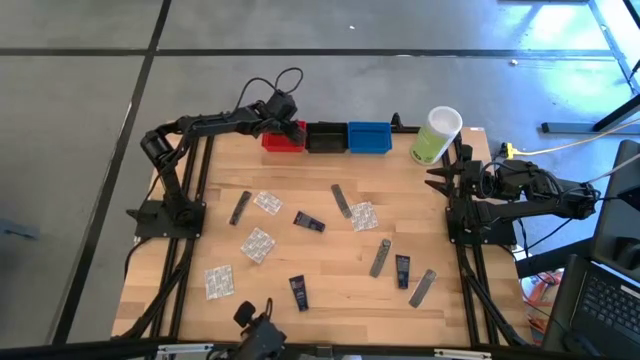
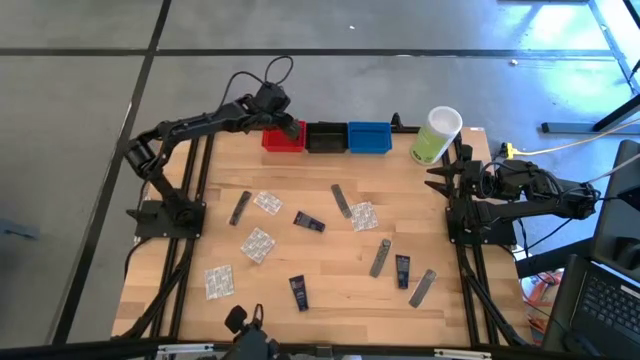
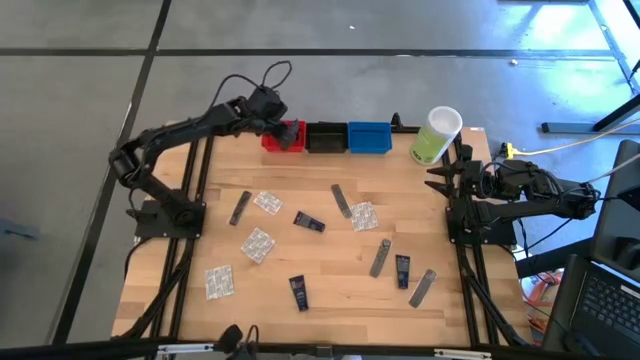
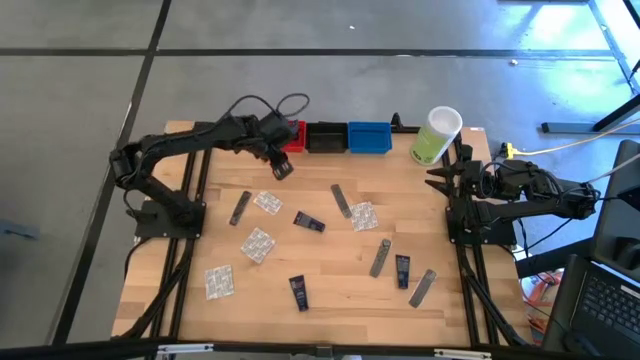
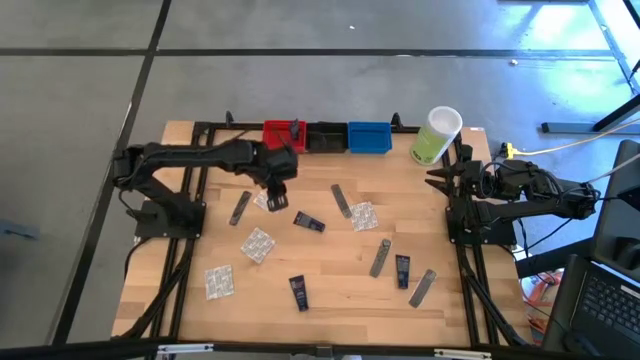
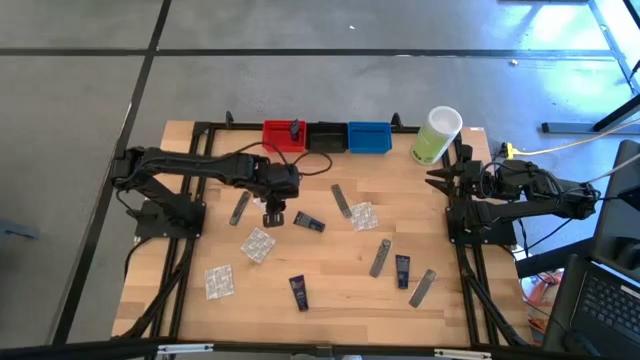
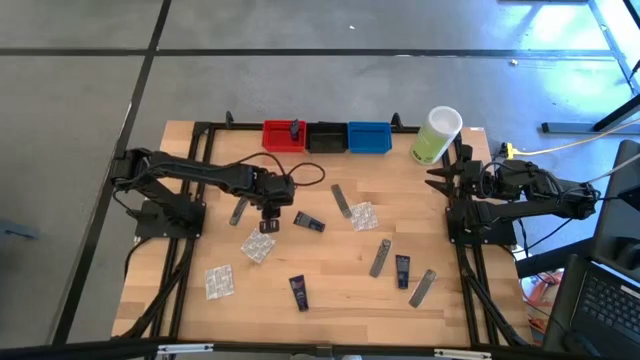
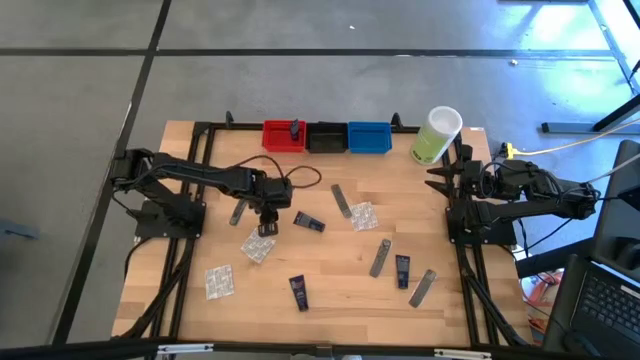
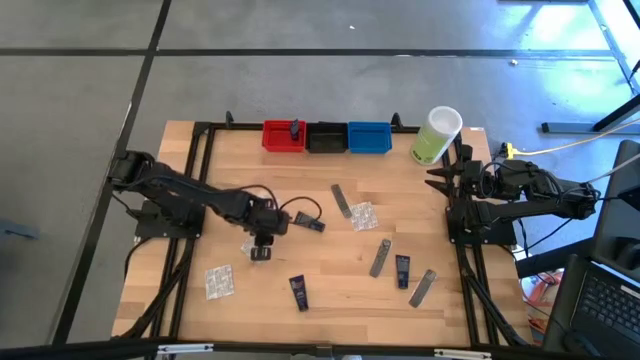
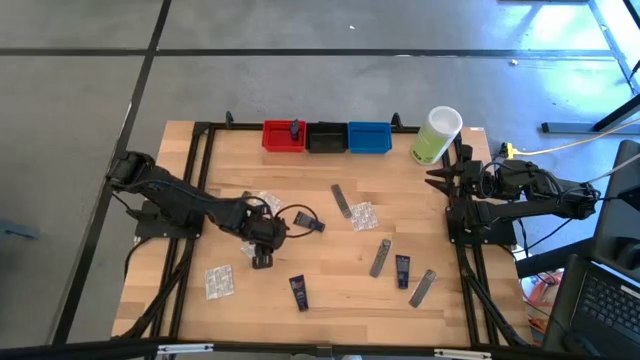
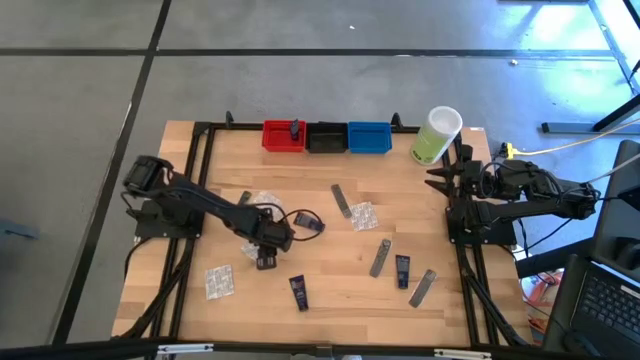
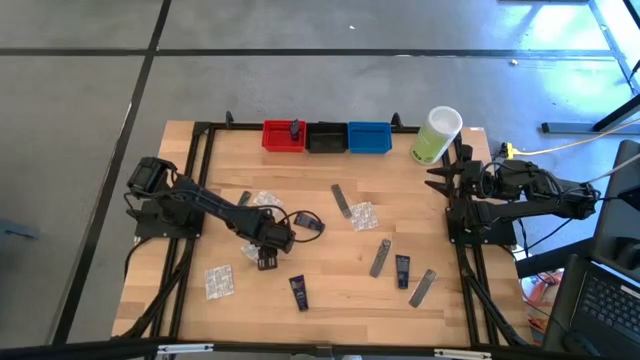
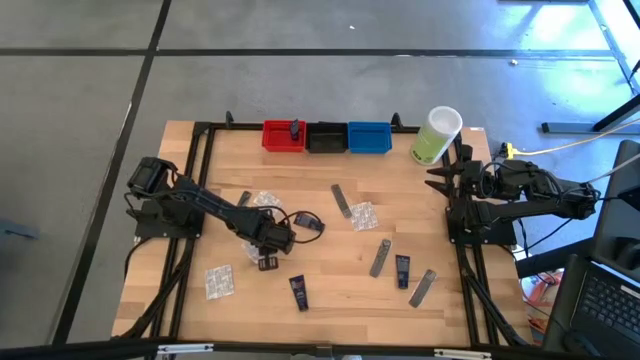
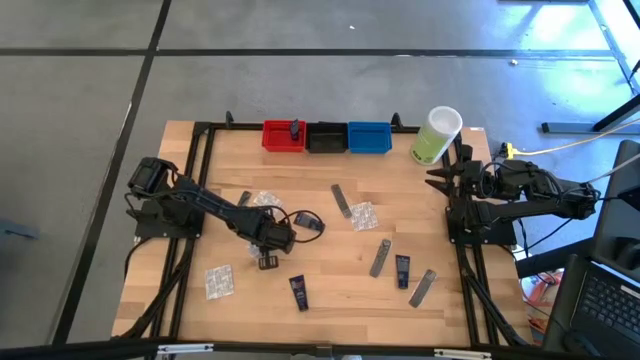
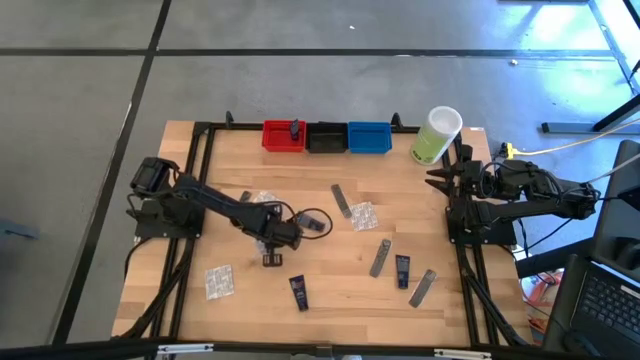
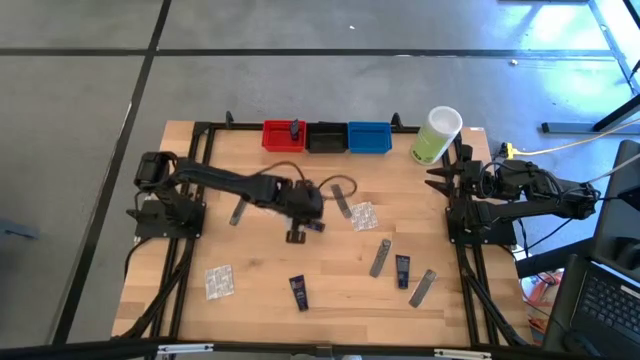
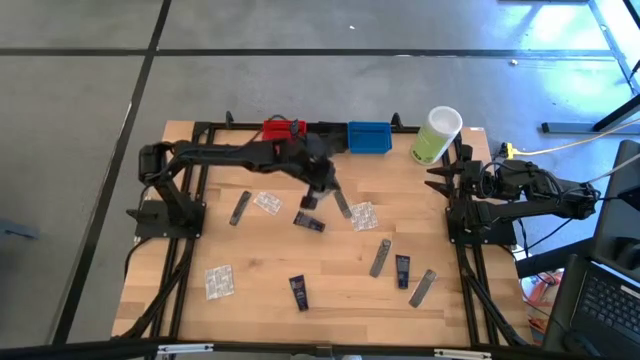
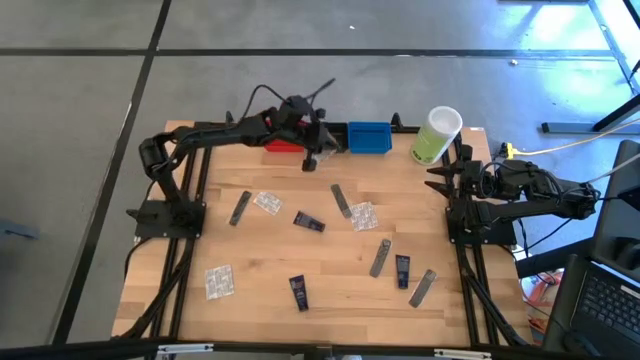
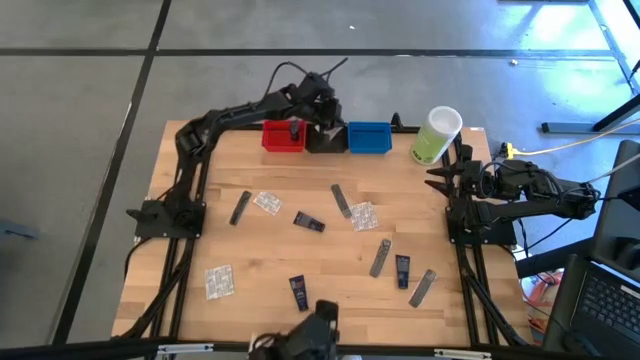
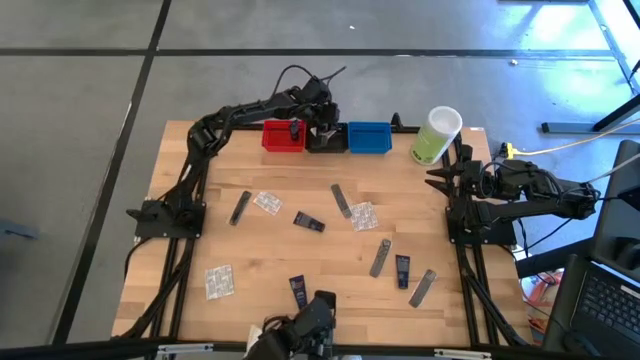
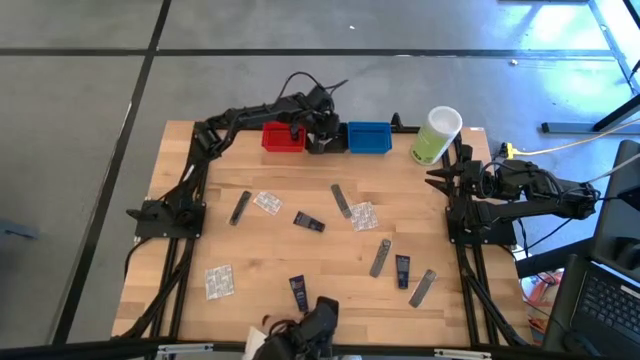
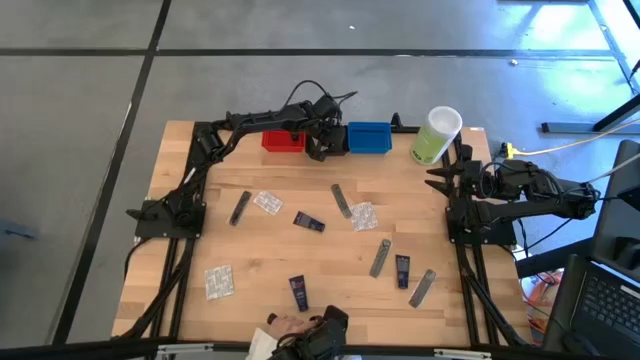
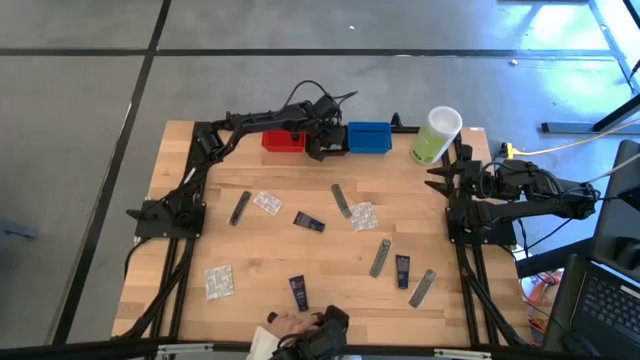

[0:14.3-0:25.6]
Task: Pick & Place Travel size toiletries
Put the white bandage pack into the black bin

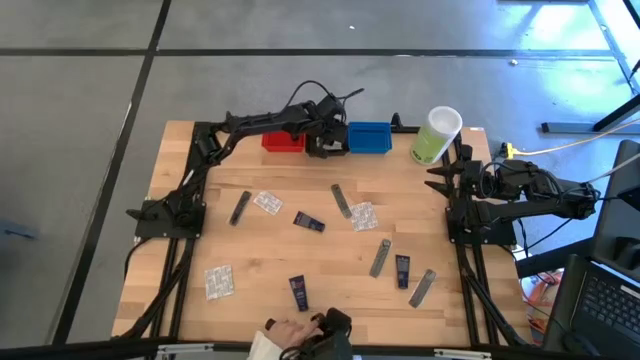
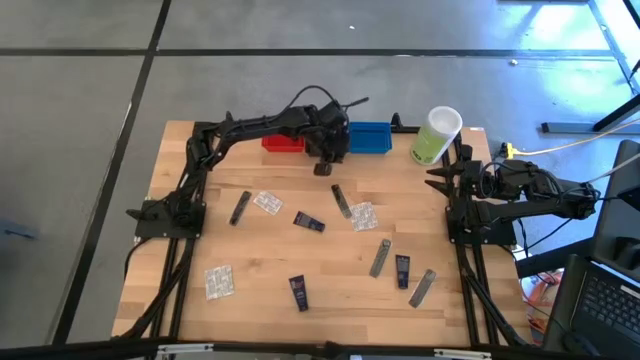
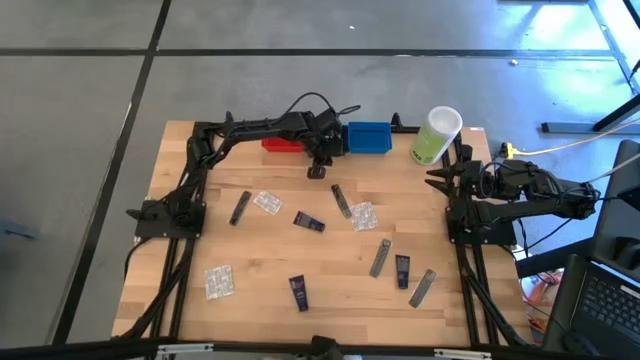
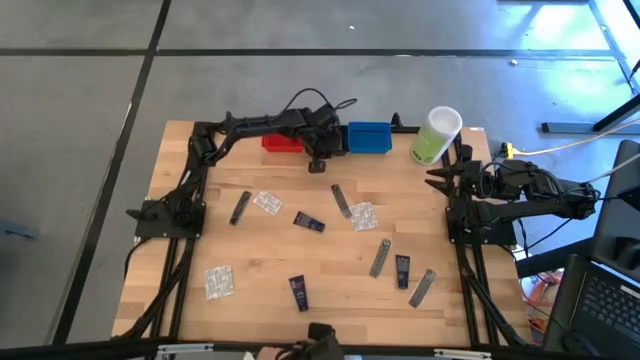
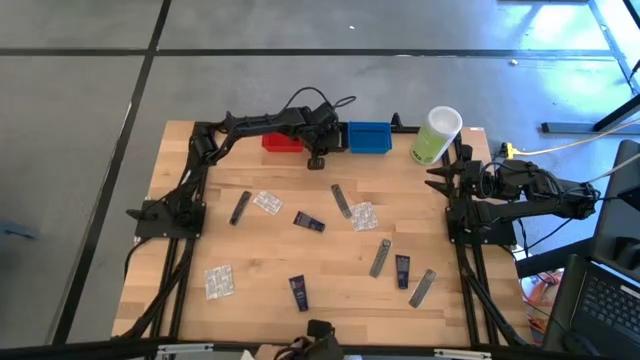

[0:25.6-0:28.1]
Adjust the black bin

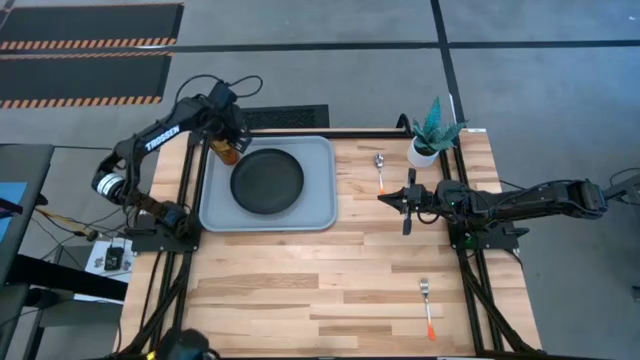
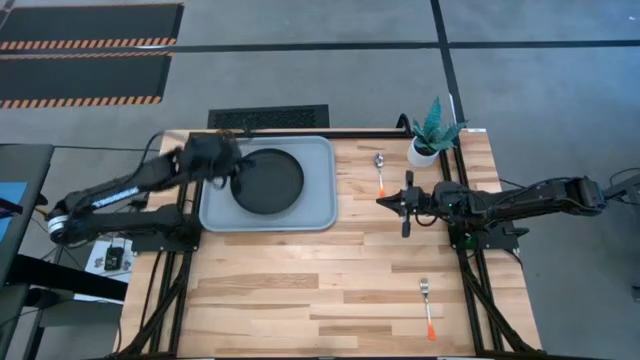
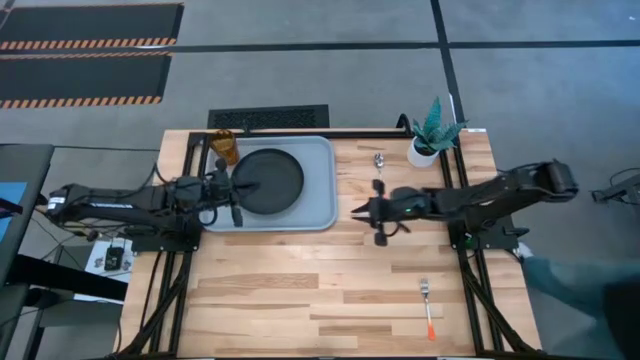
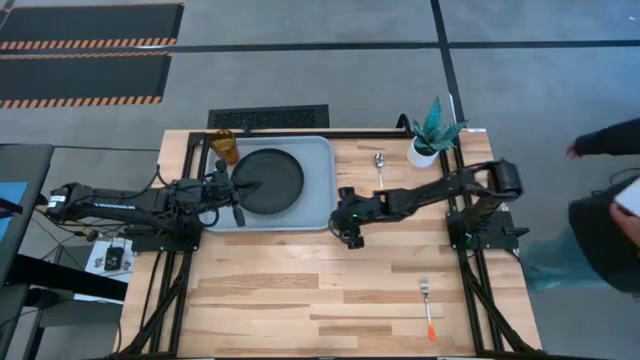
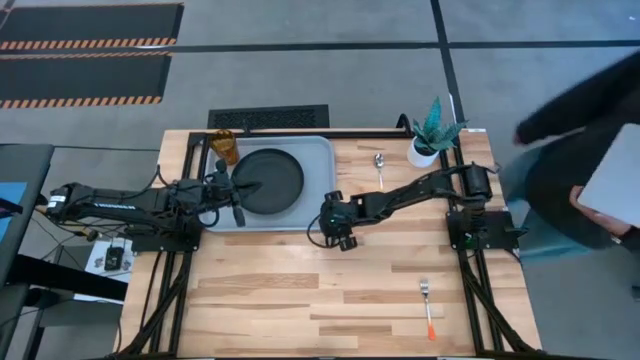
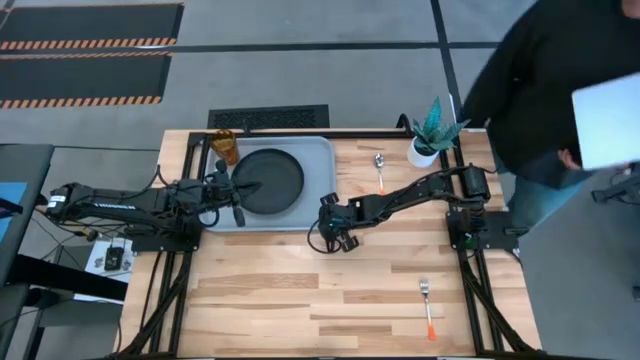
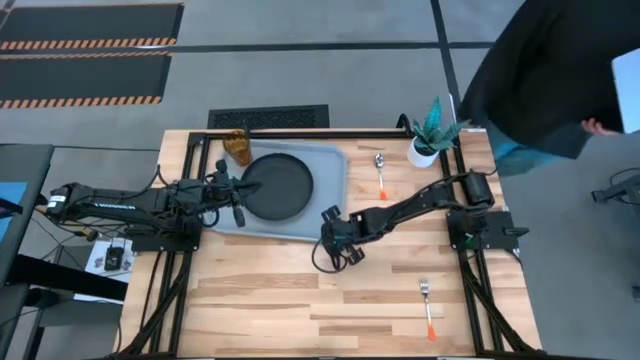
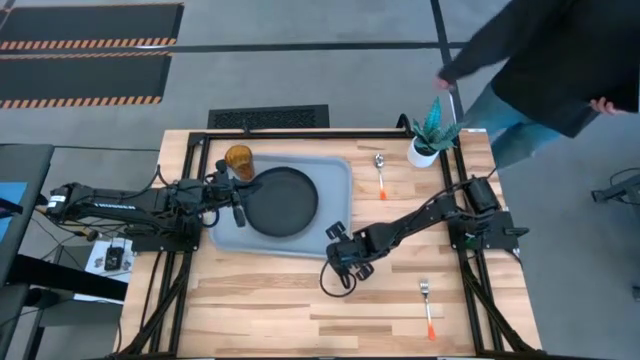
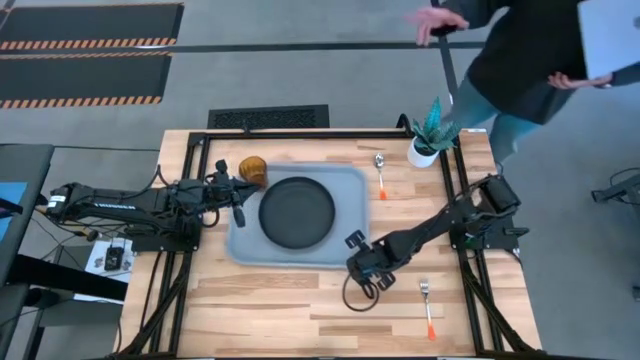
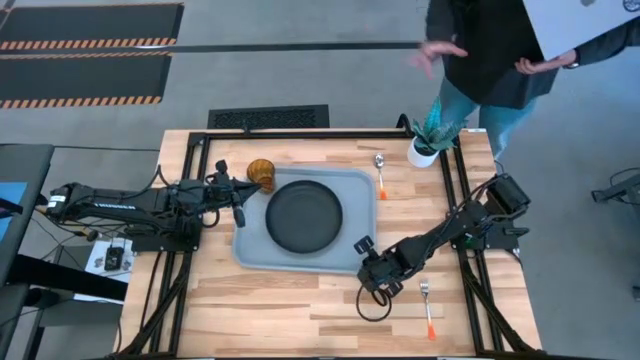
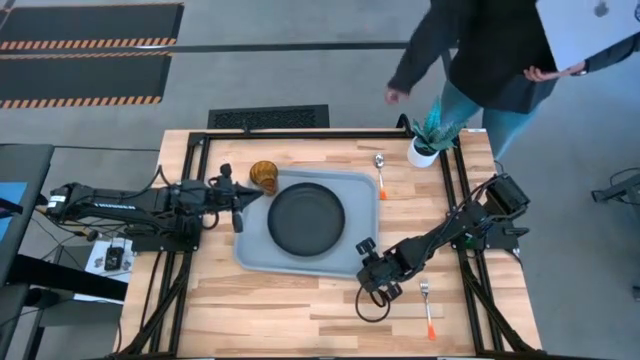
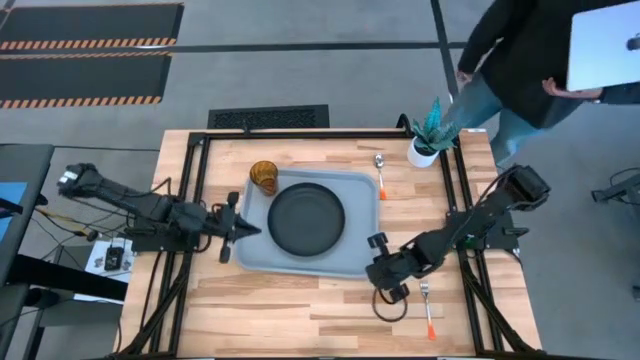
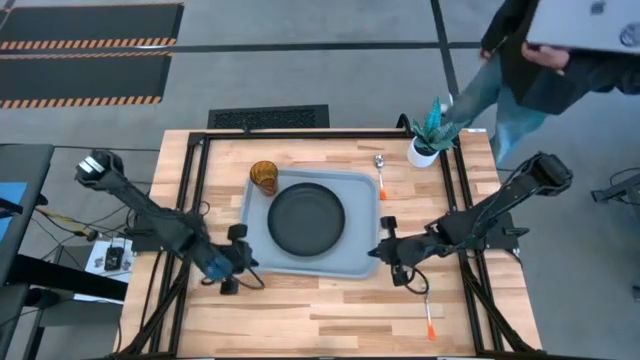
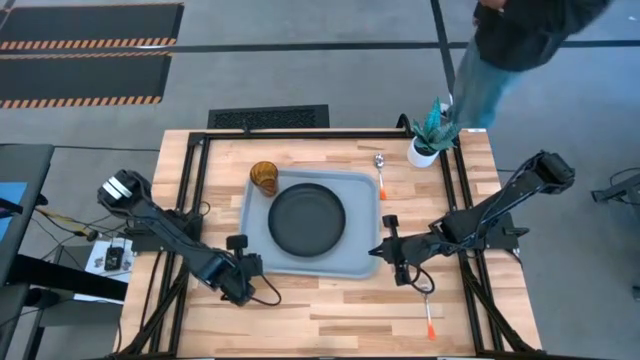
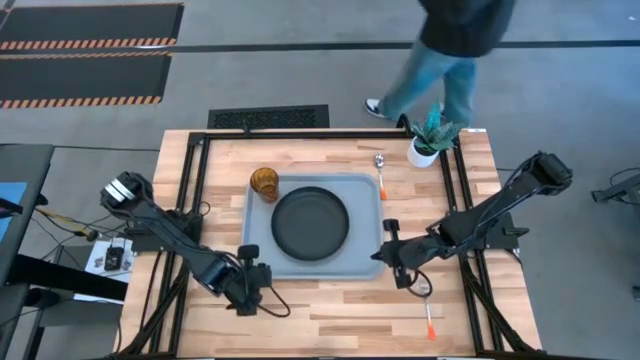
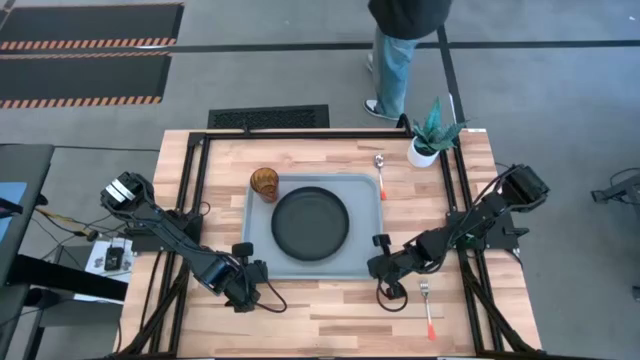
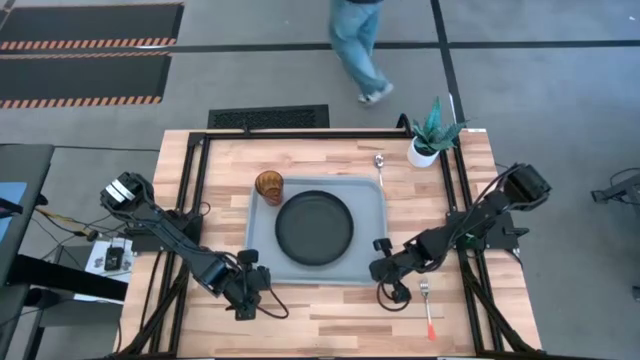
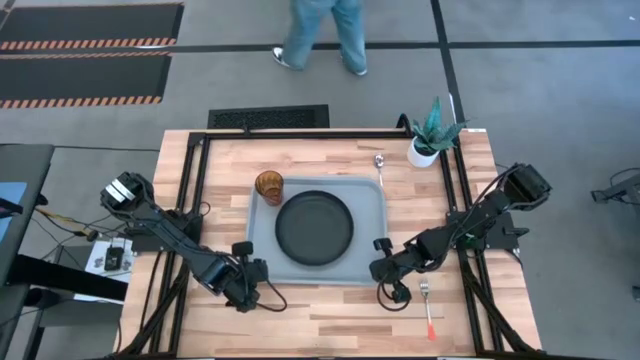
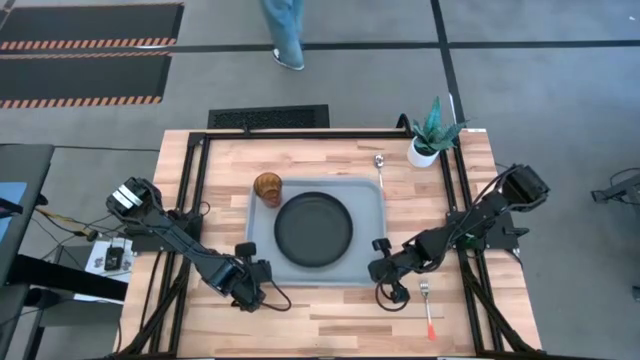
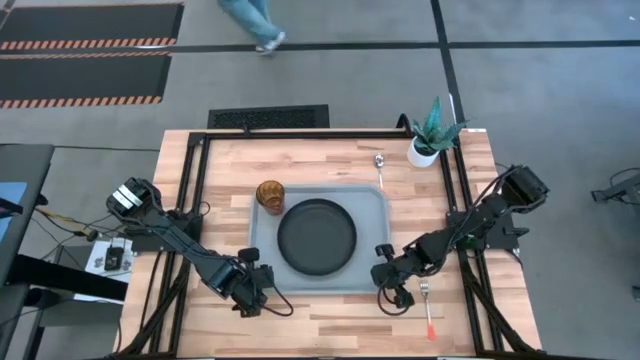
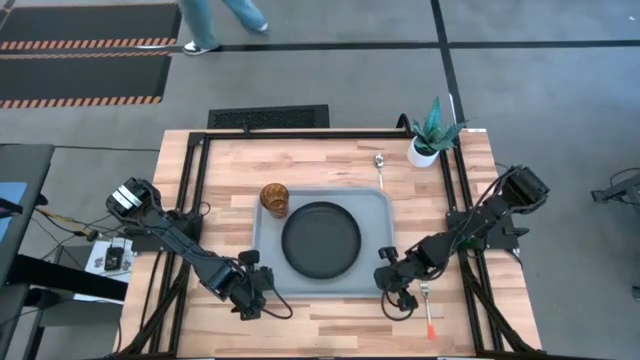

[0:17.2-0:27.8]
Task: Pick and place plate/cup/fork/spoon on tray
Move the gray serving tray to the middle of the table
